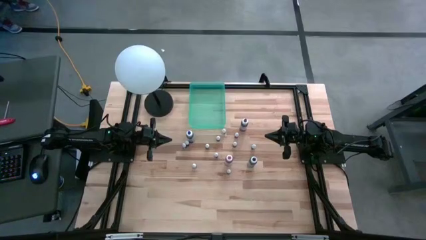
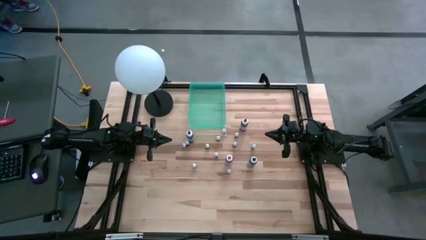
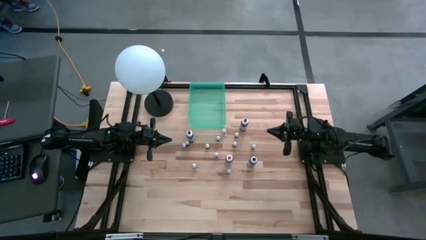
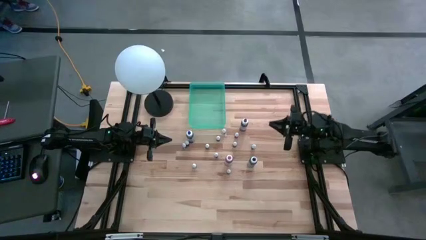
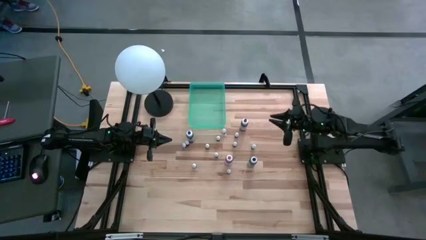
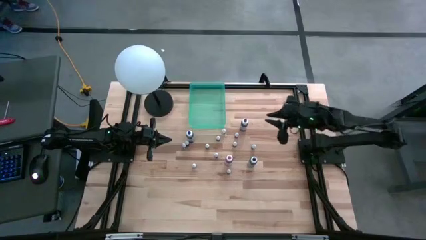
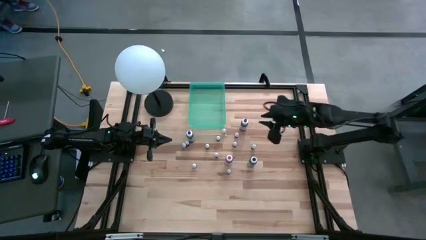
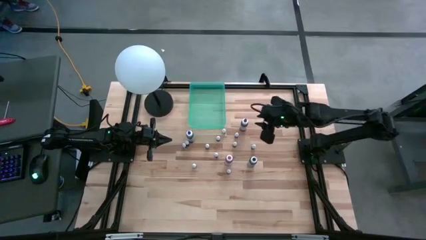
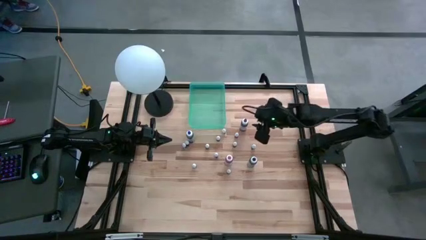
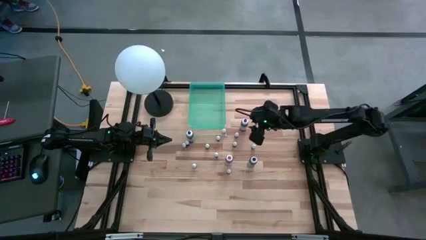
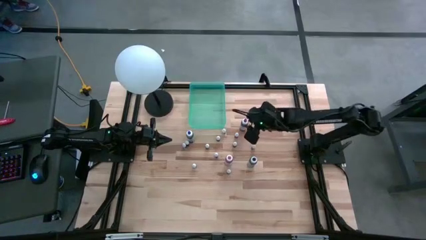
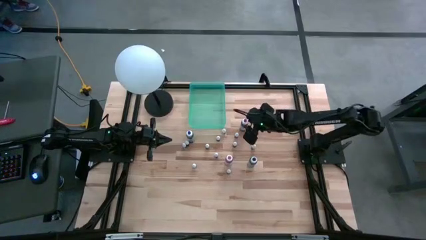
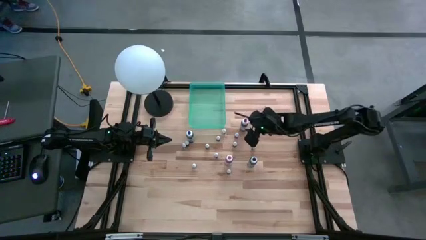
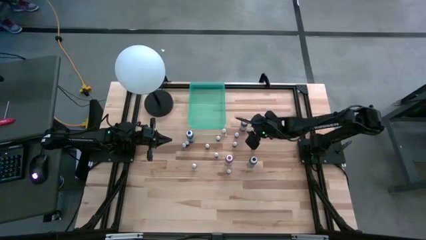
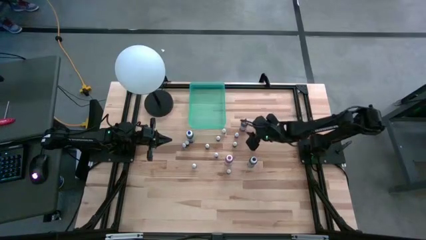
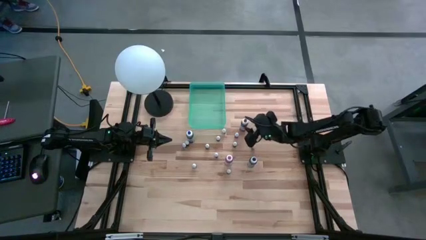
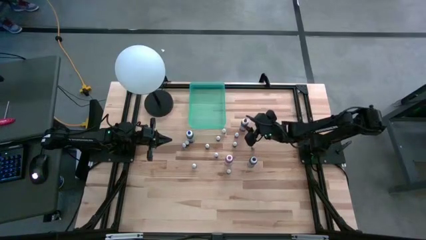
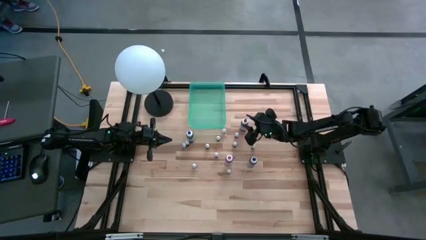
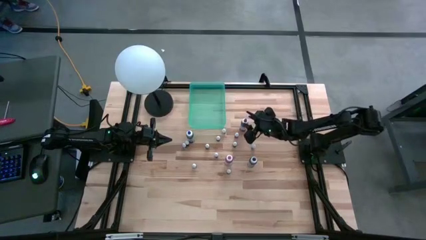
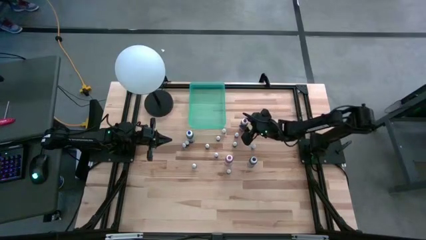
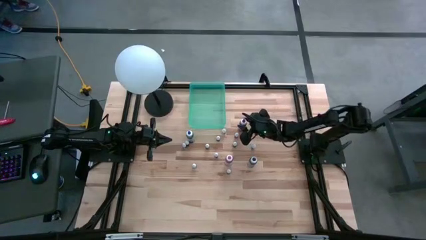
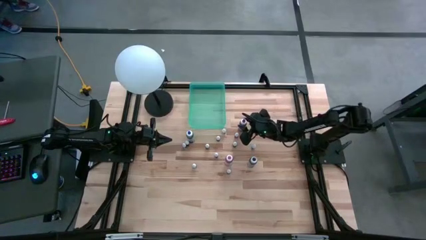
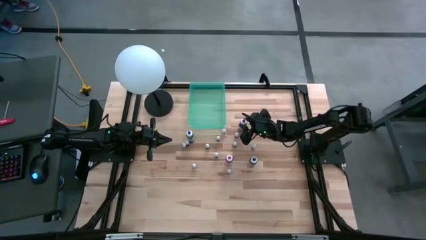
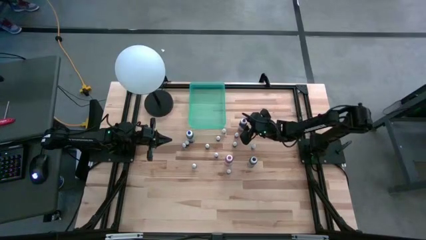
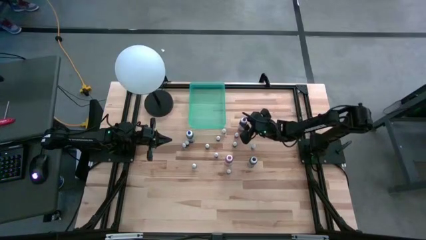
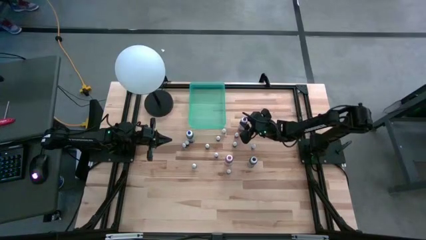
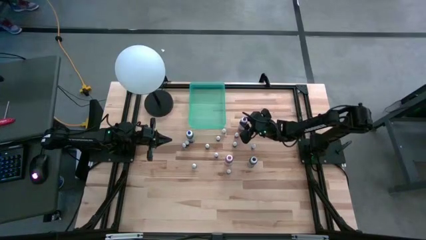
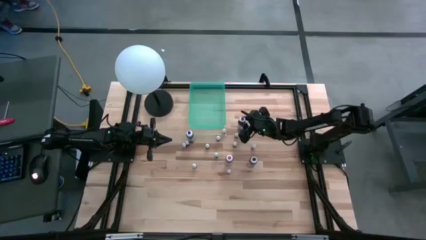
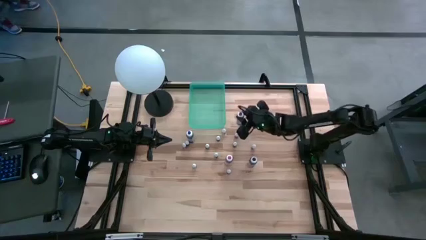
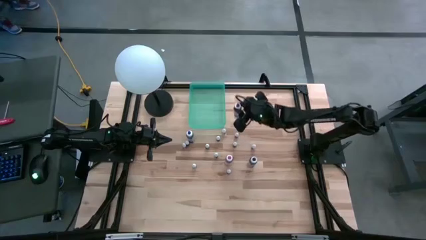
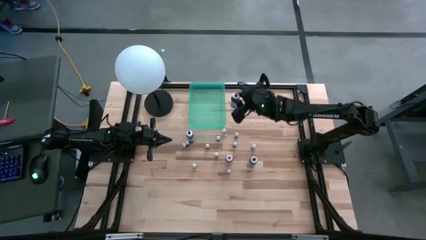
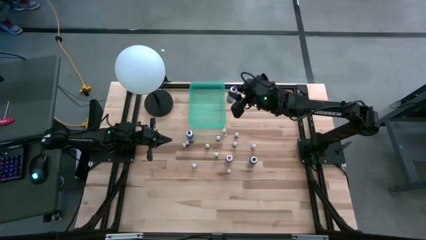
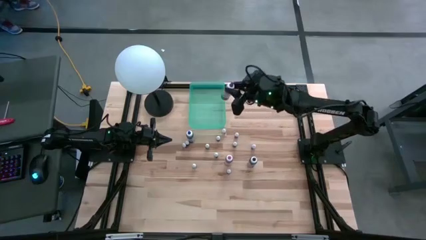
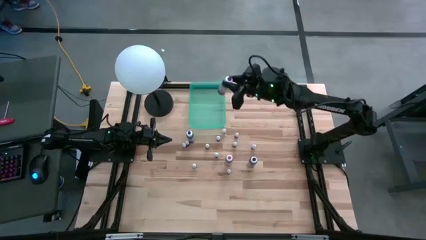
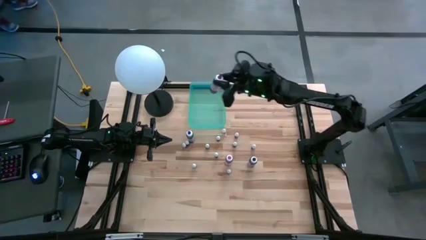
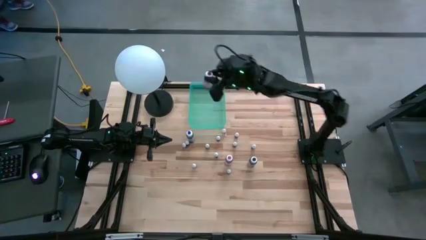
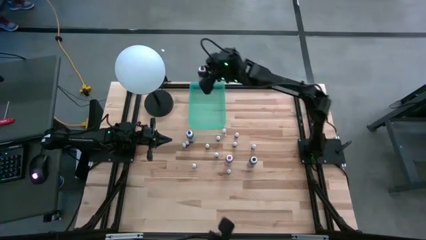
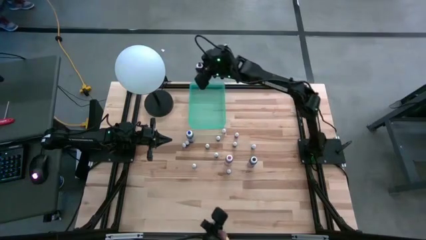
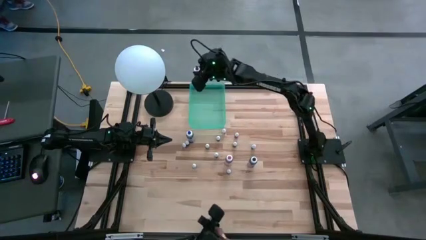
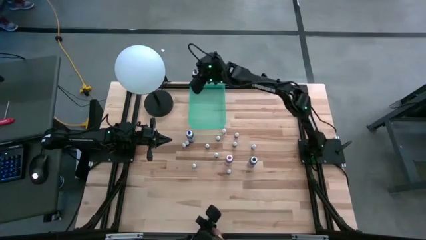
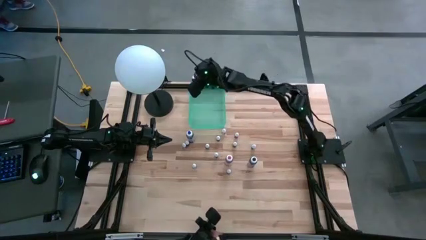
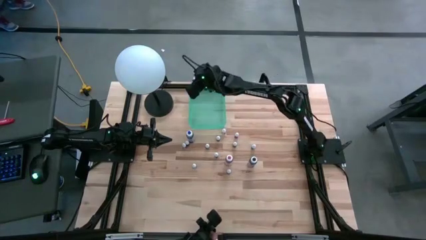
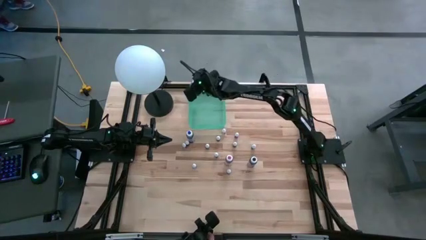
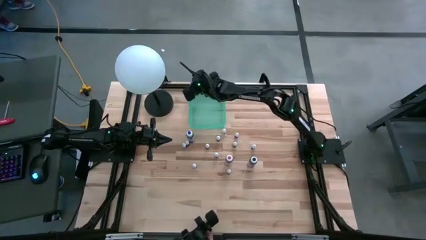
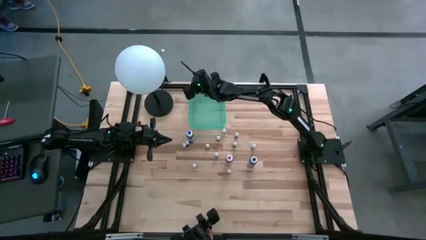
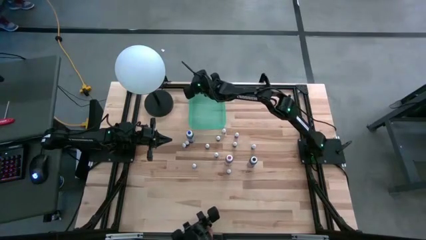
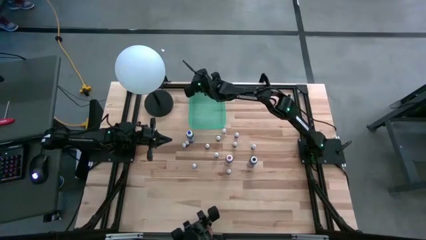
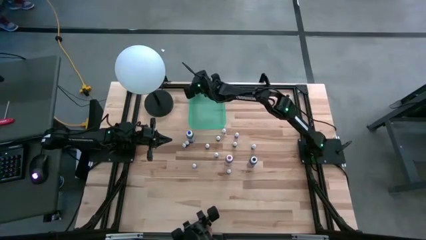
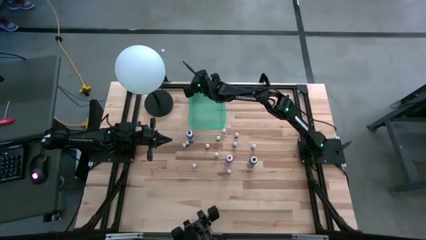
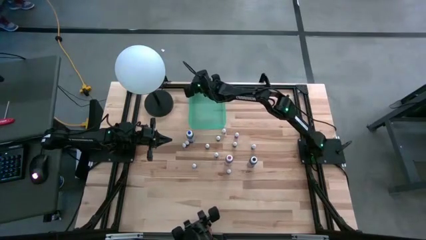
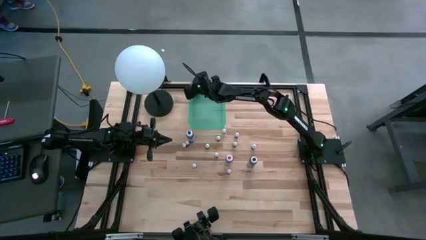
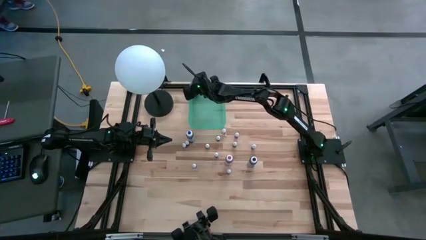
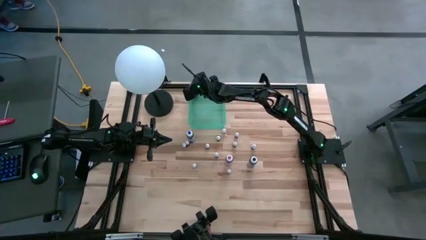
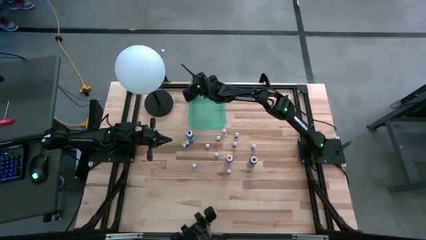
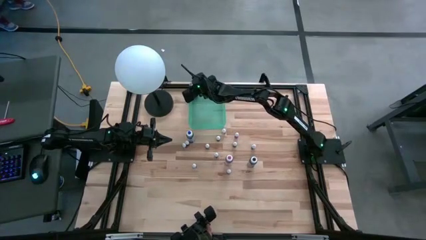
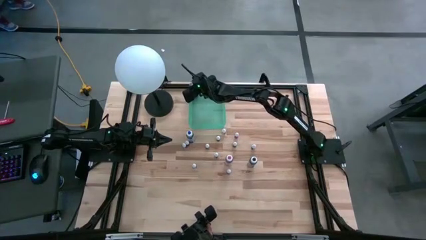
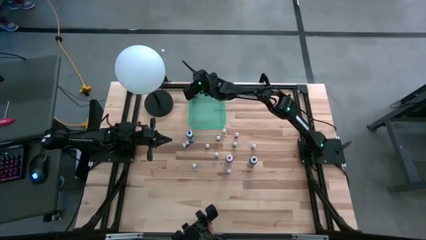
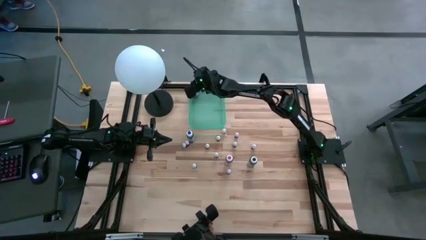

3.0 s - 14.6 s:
Task: Pick & Place food coloring
Put the large purple food coloring bottle into the blue bin

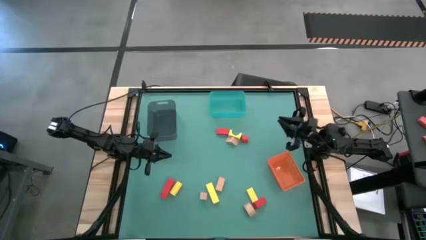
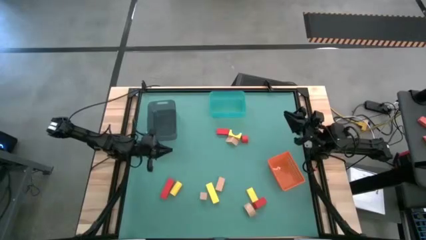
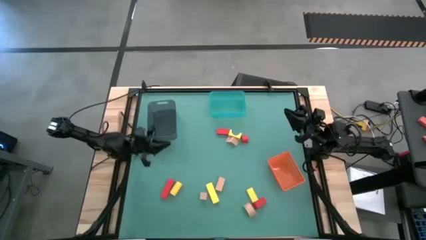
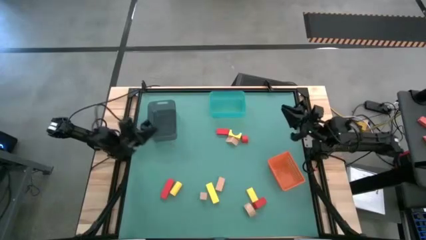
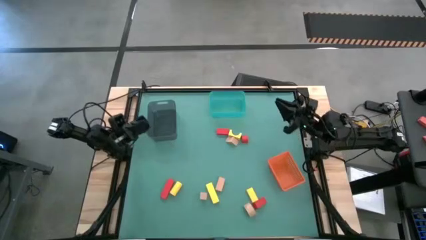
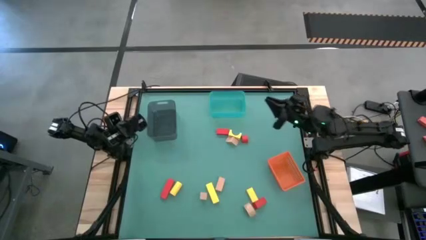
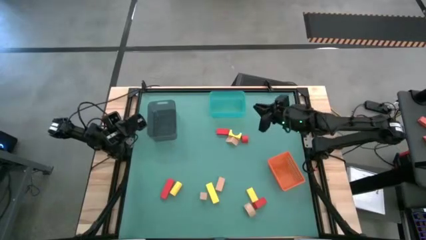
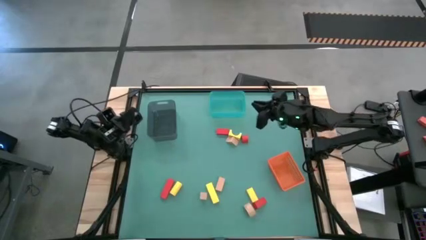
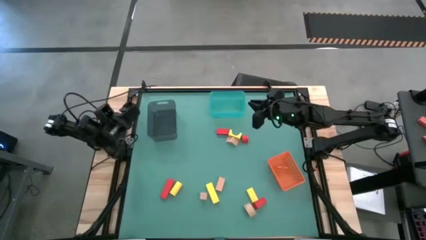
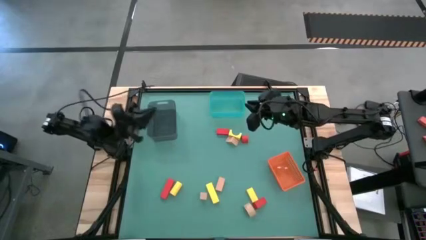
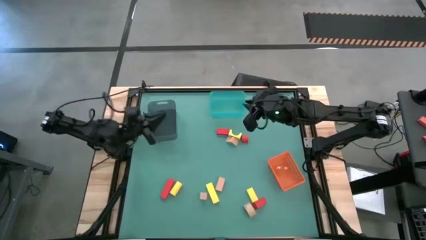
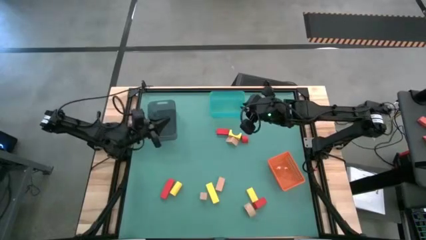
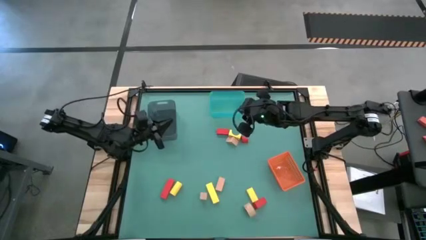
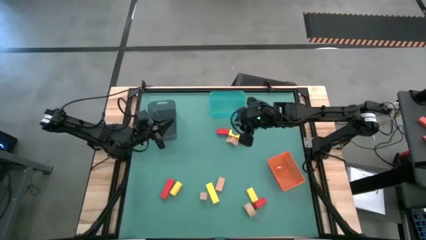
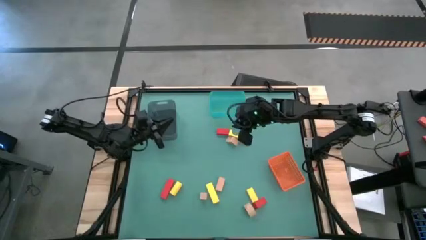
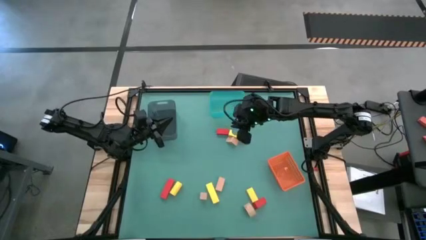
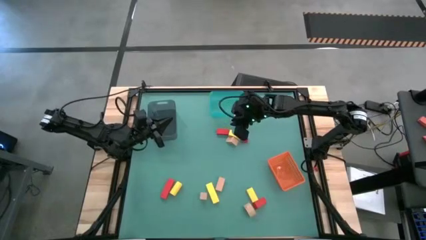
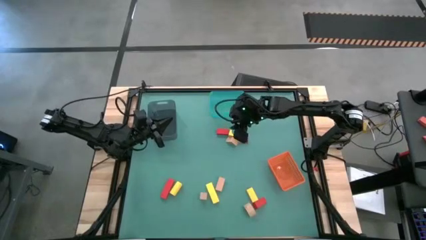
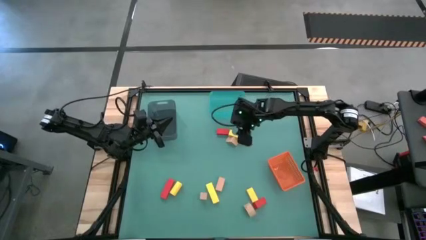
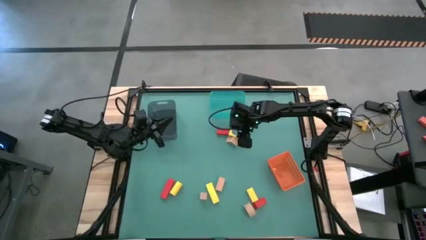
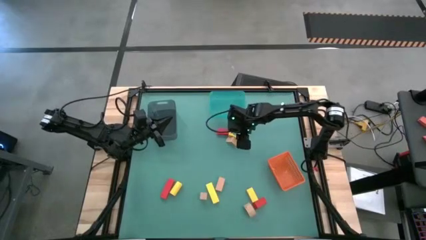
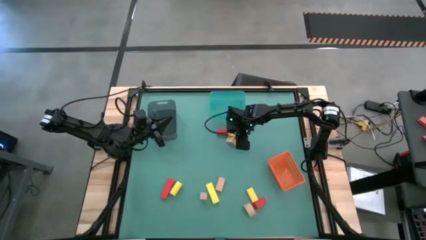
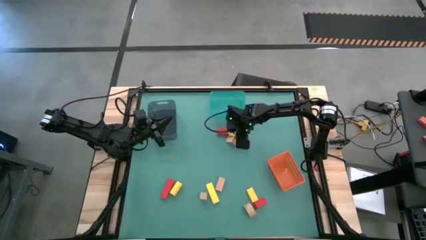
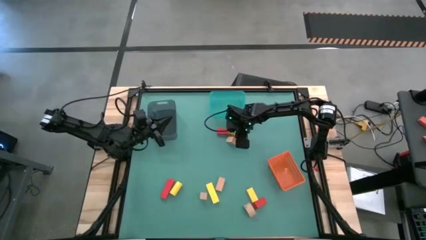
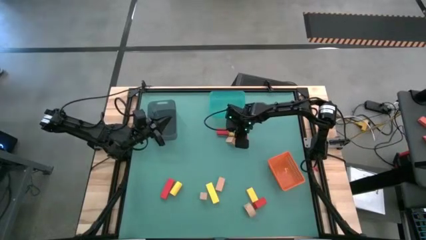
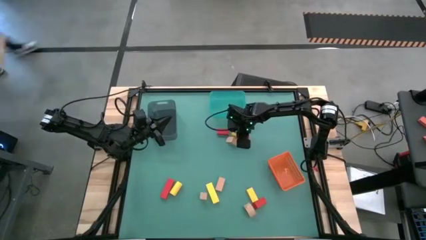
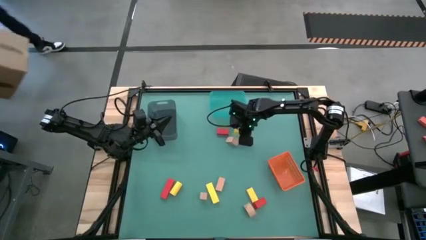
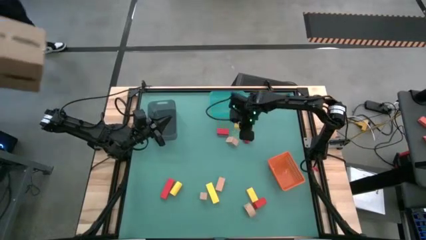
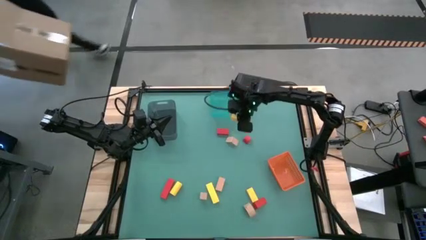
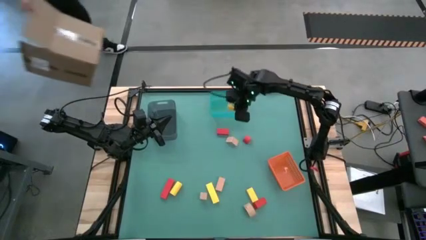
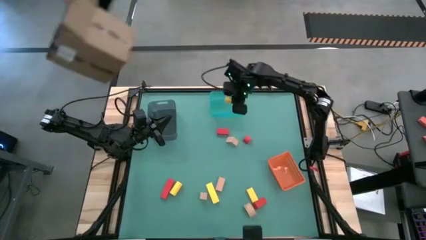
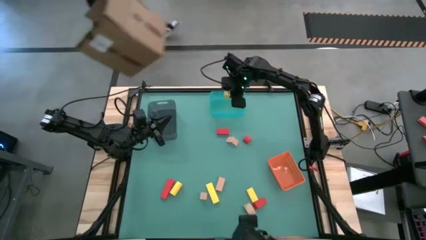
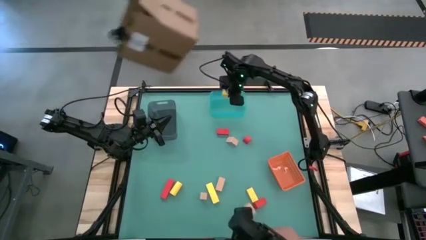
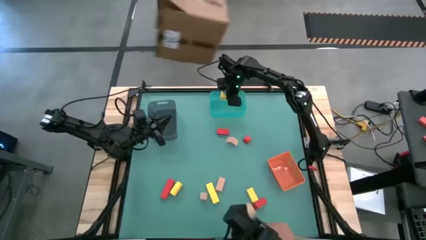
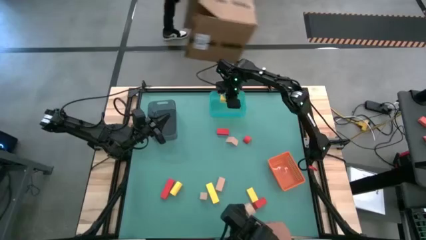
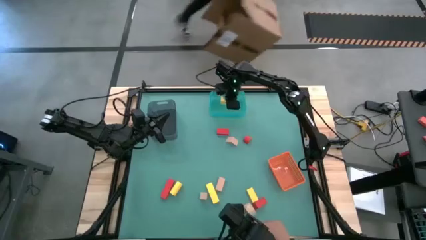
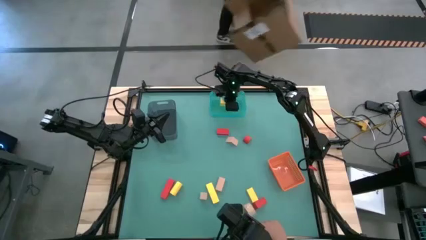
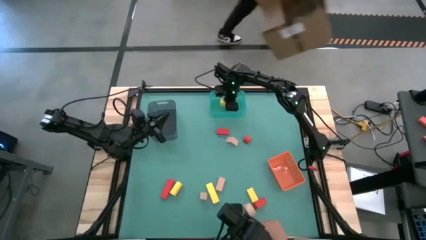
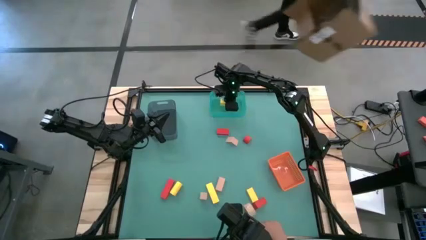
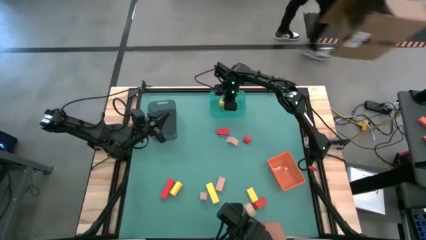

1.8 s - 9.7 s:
Task: Sort & place blocks by color
Put the yellow block into the green bin
